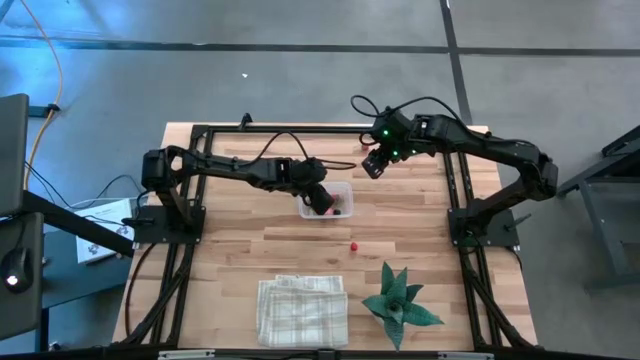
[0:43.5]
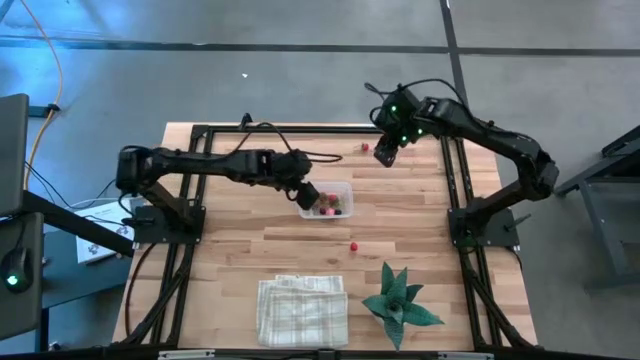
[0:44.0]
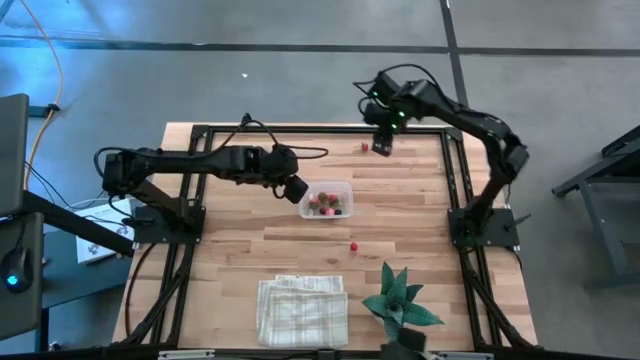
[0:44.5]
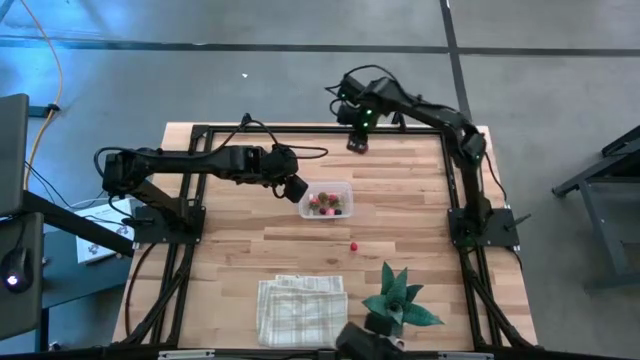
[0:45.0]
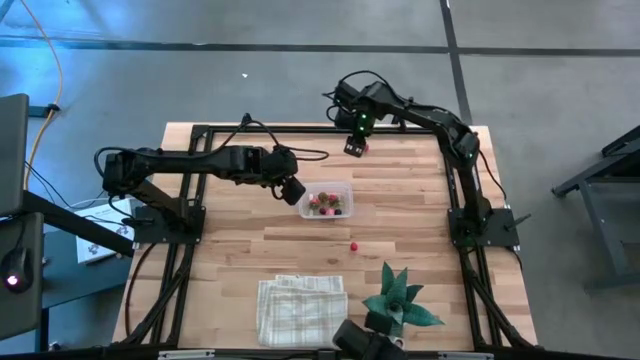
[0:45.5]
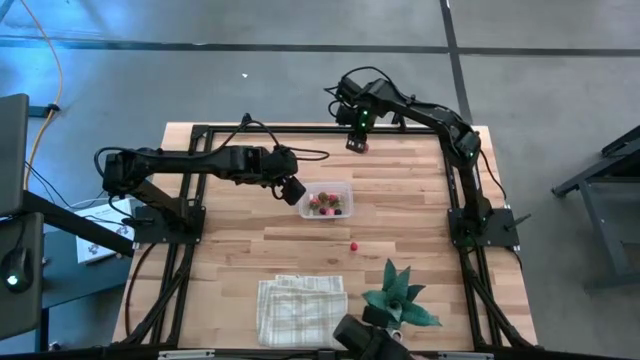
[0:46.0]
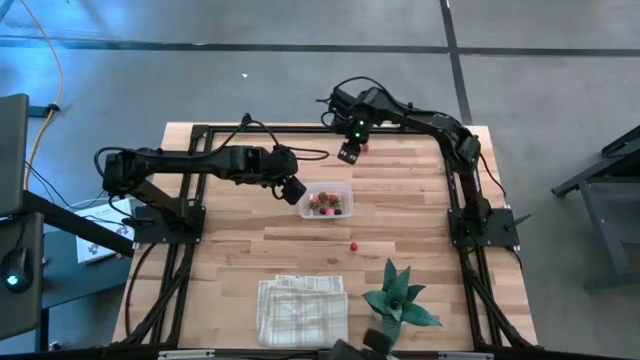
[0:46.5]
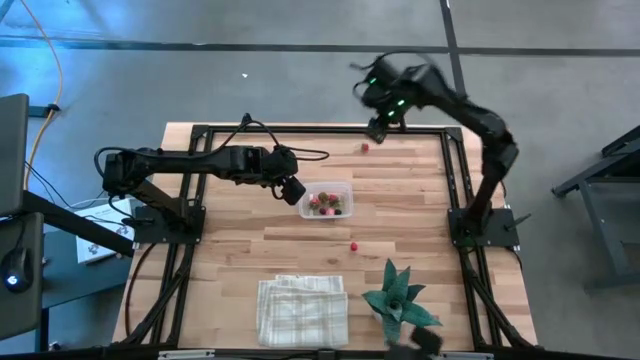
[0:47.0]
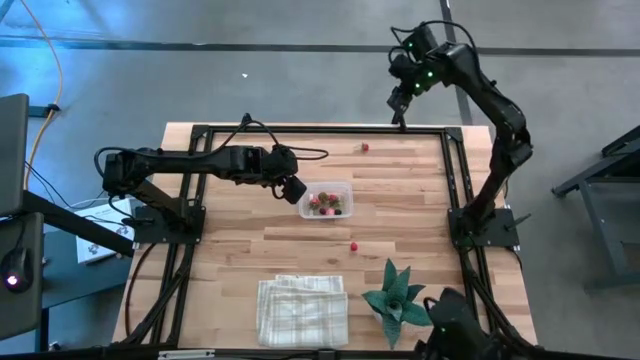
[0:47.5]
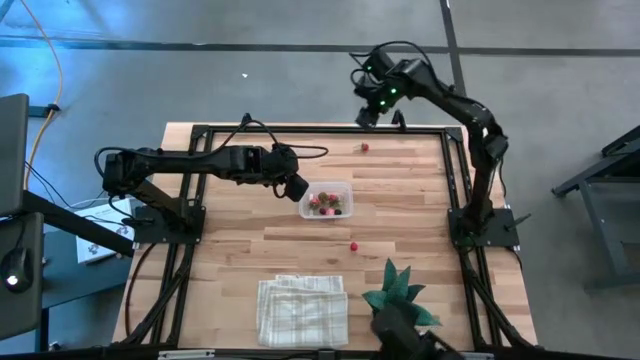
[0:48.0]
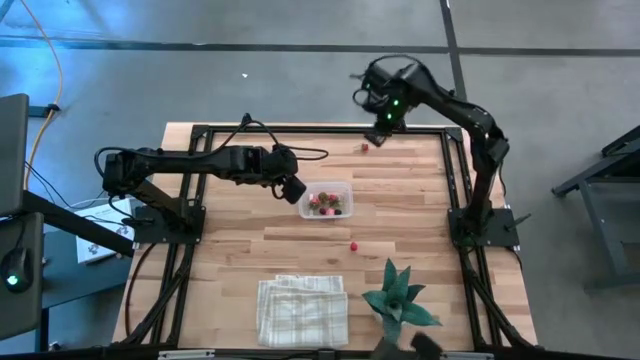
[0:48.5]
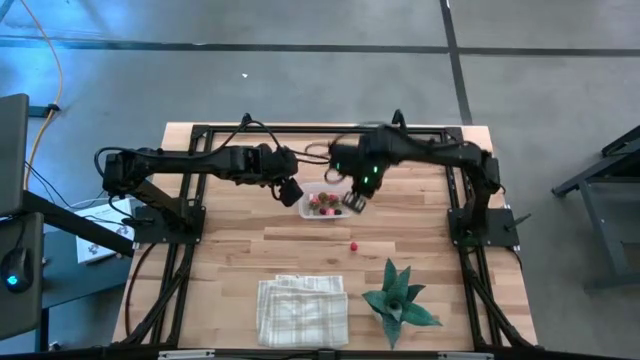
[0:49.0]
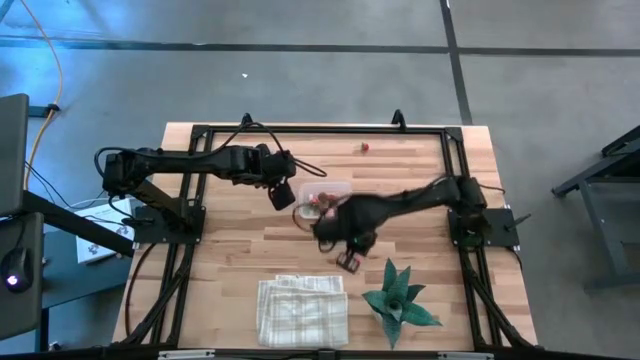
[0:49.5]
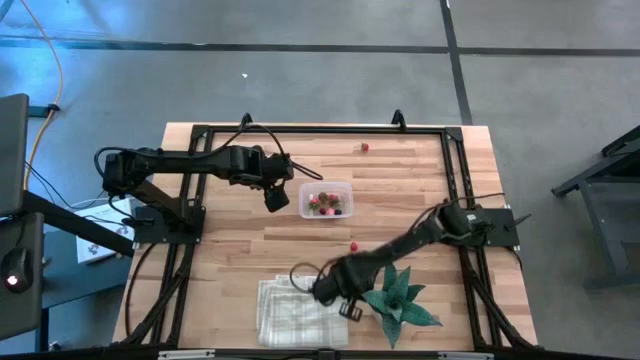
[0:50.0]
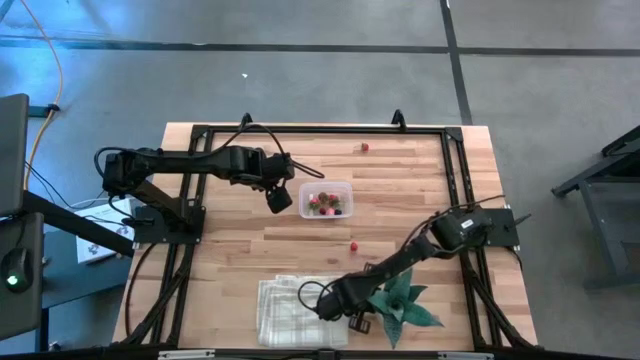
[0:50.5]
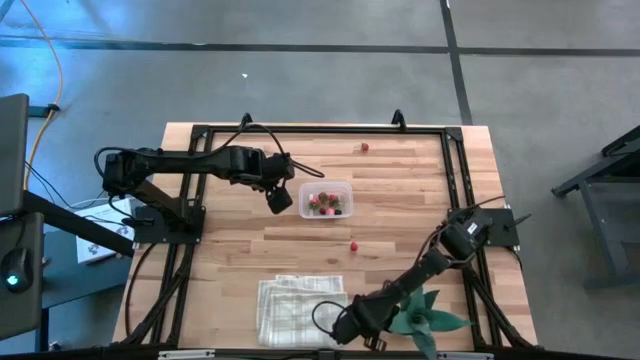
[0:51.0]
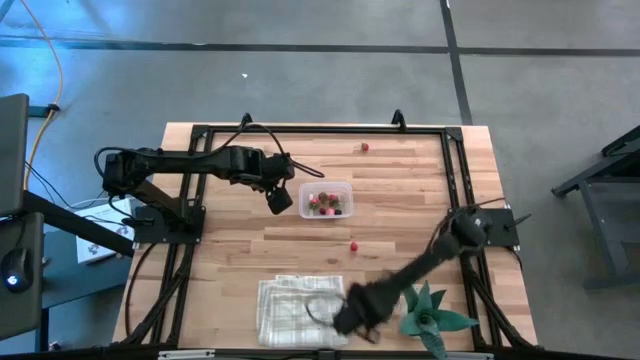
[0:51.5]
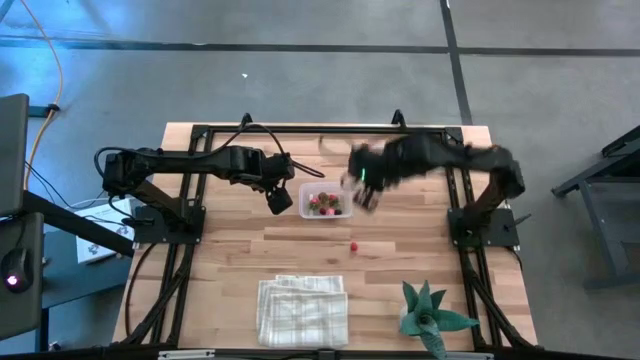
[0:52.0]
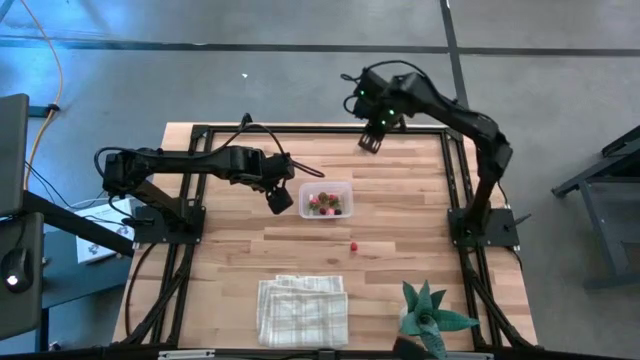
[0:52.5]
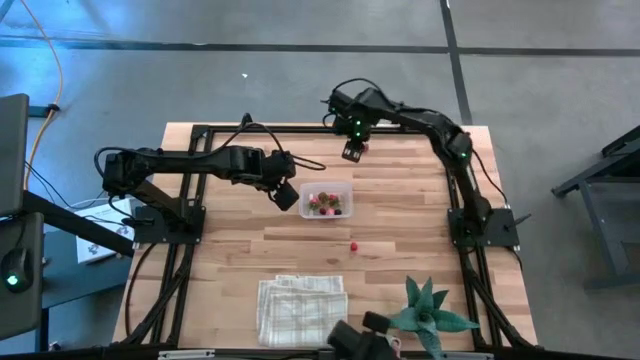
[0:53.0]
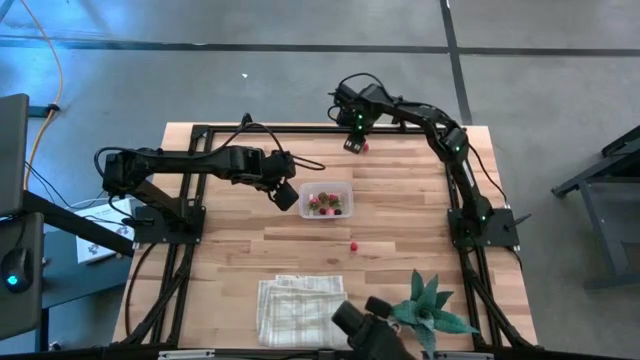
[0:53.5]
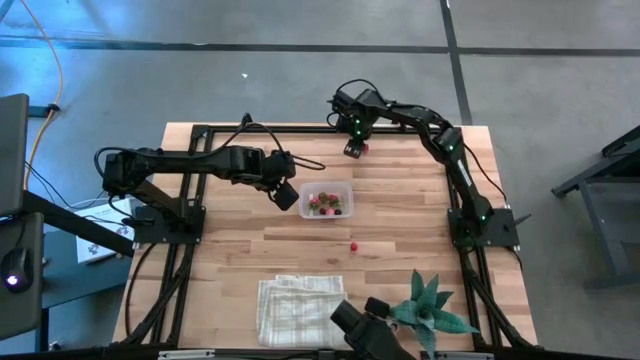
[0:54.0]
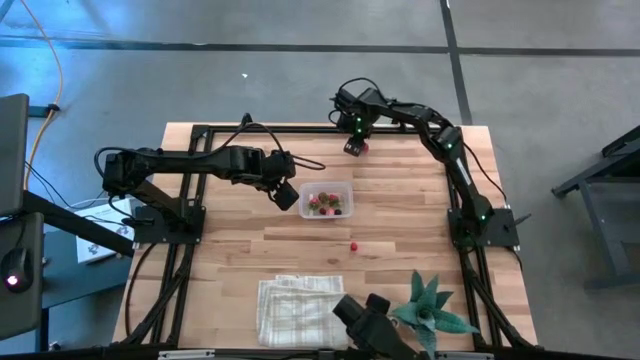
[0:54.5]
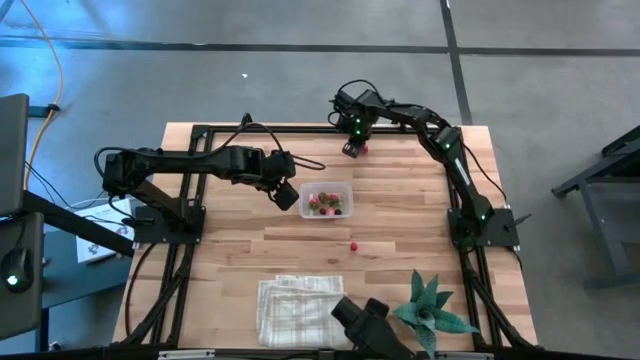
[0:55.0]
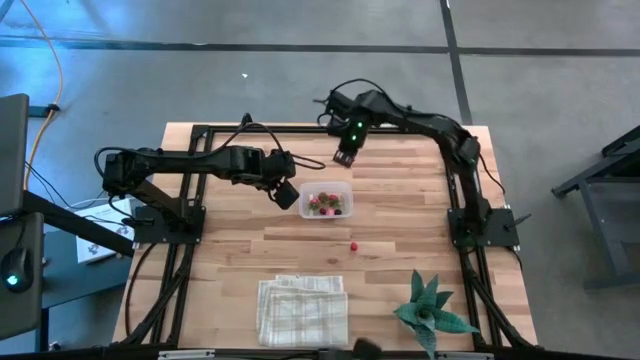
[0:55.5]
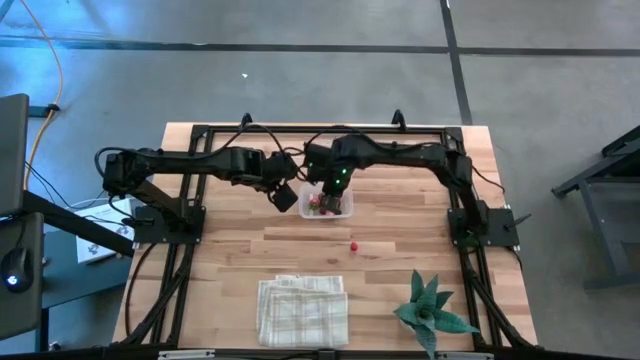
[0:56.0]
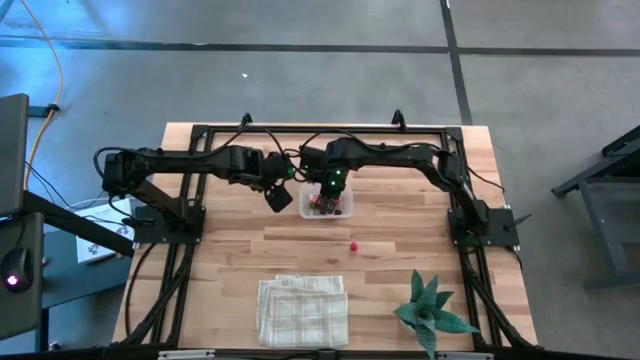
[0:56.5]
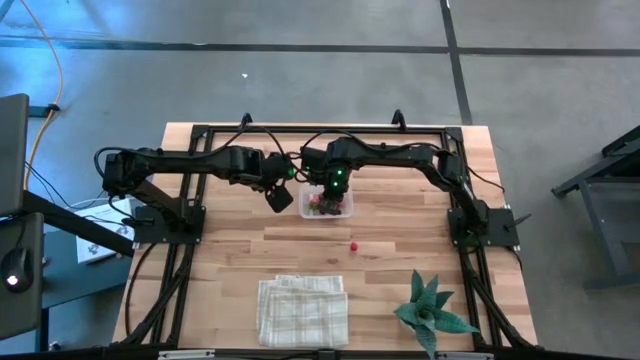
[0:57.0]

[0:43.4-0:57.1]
Task: Pick and placing Produce into tupperware
Put the red peach into the transparent bin

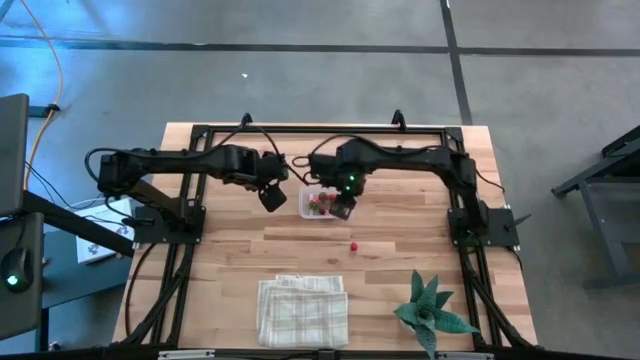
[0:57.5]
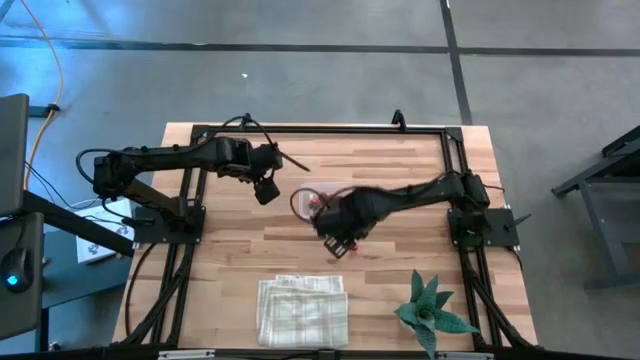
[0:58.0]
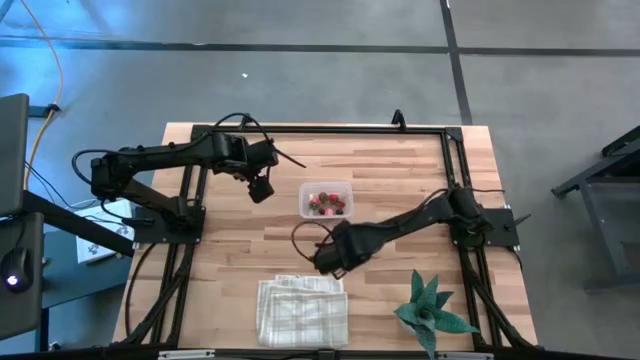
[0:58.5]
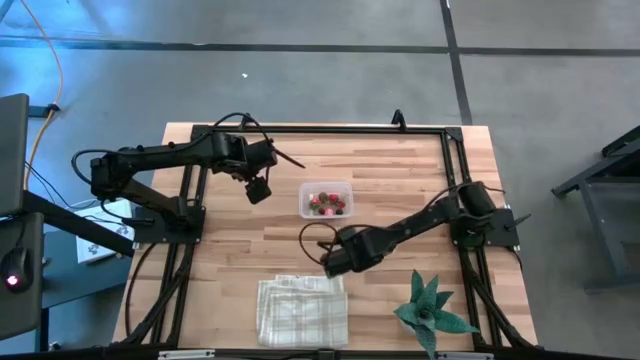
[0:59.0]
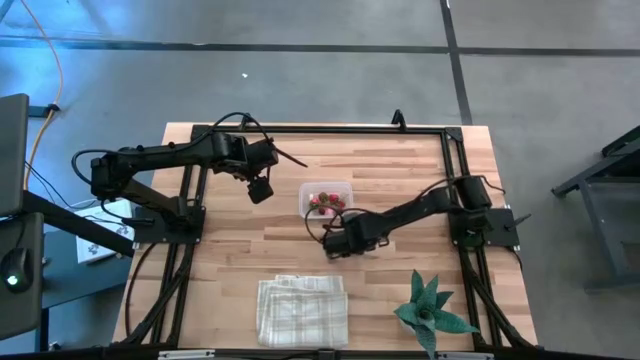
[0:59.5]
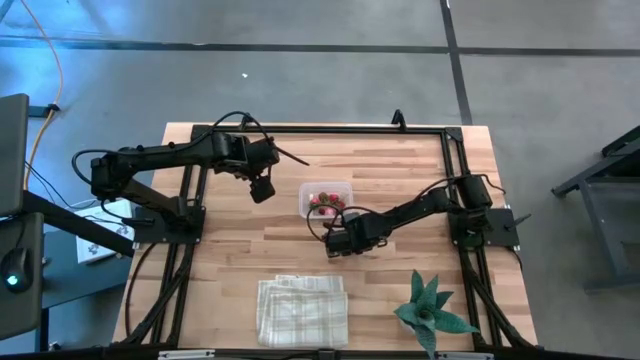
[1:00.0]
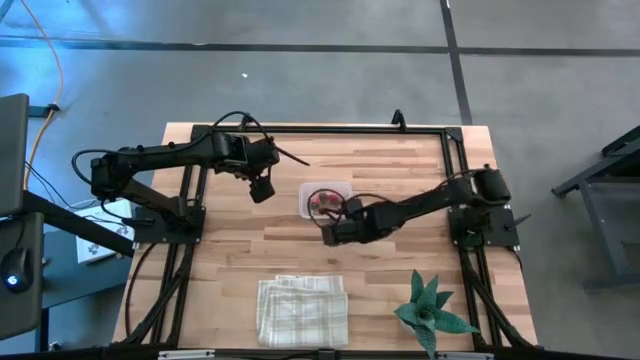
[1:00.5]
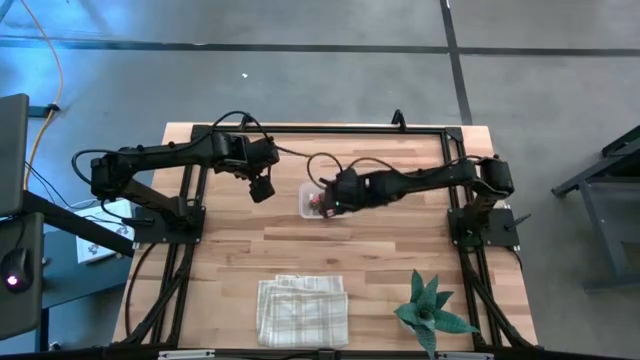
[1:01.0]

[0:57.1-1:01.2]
Put the red raspberry into the transparent bin

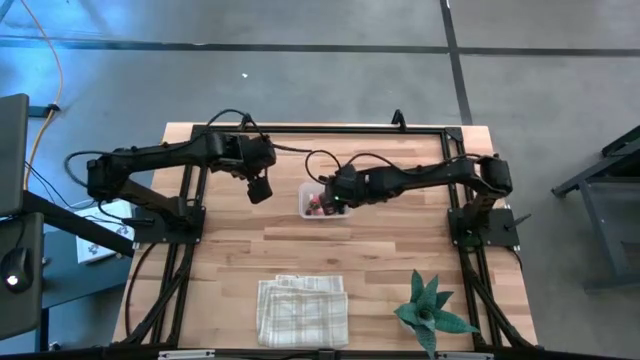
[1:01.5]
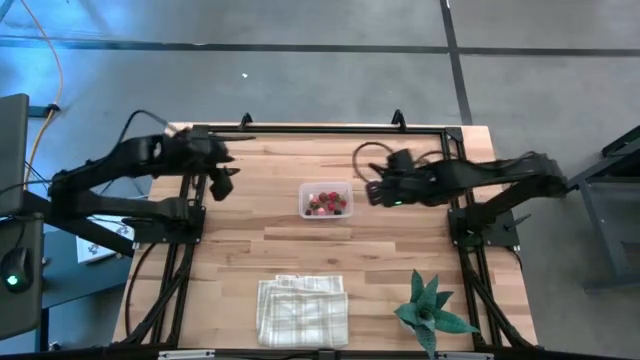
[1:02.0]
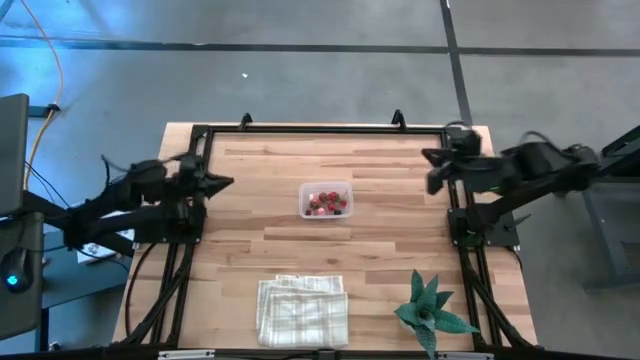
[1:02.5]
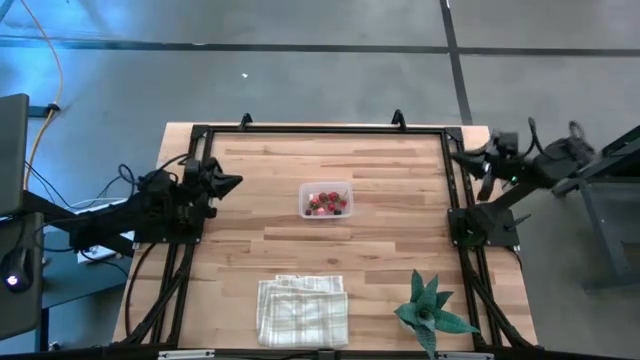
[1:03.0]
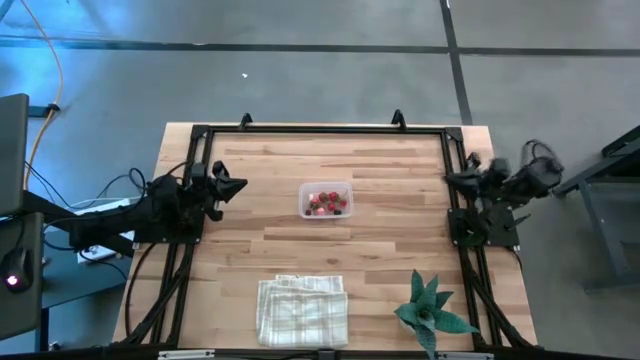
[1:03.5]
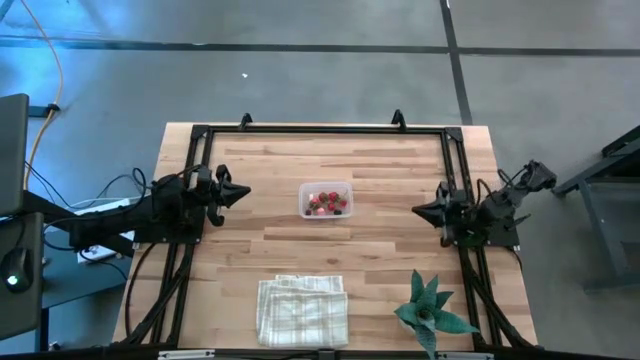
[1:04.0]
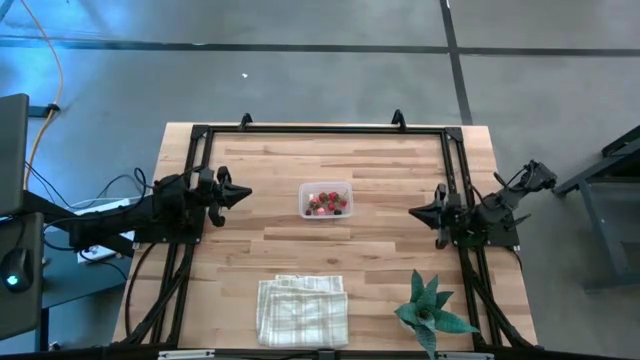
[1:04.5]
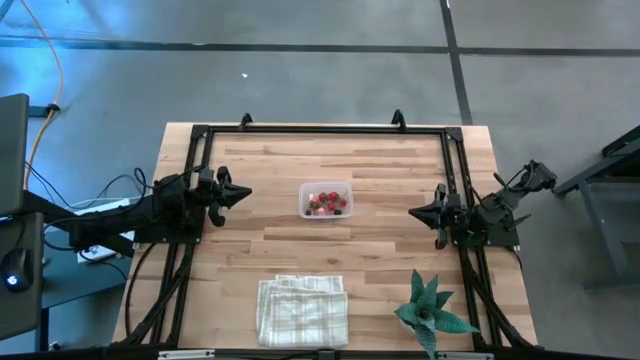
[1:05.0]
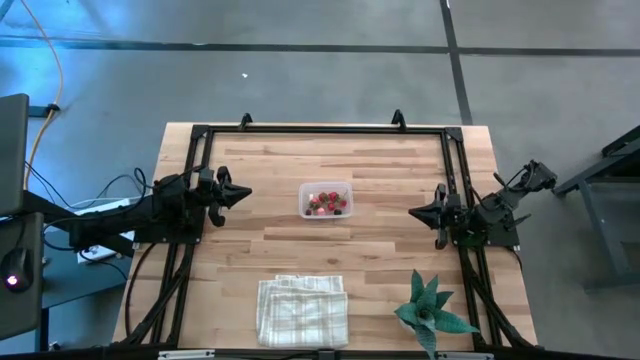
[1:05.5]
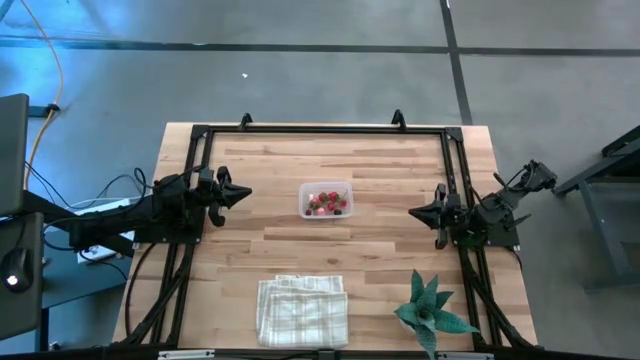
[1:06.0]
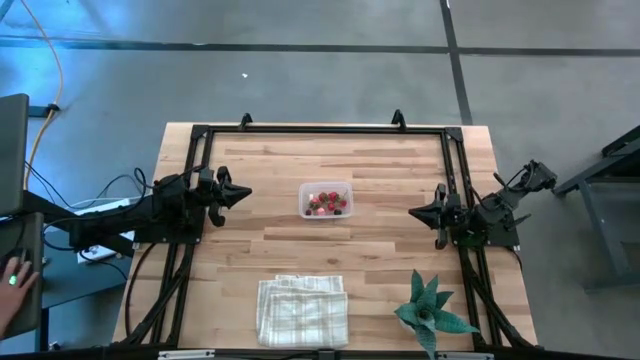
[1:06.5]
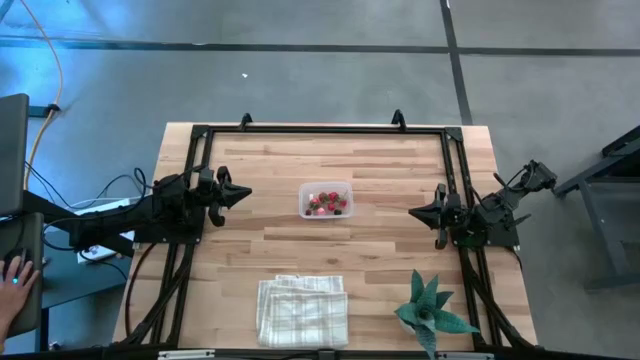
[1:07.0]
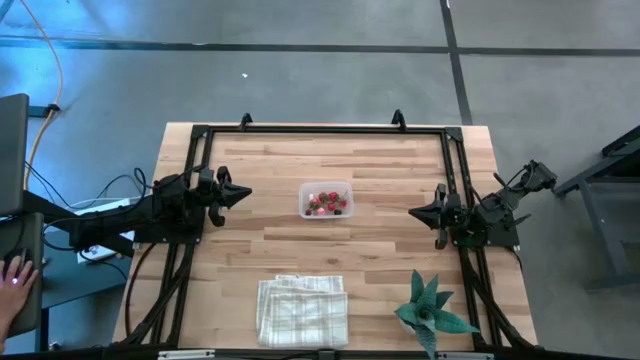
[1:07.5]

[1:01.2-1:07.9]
Return to Home Position
